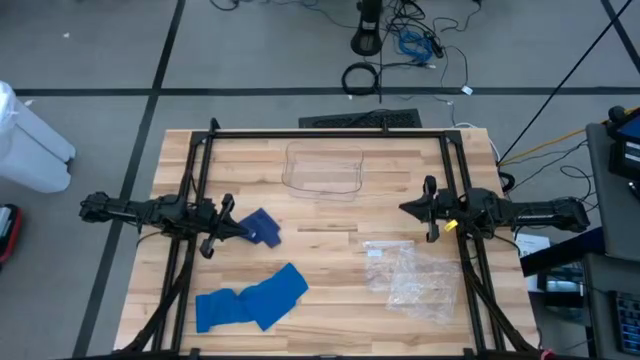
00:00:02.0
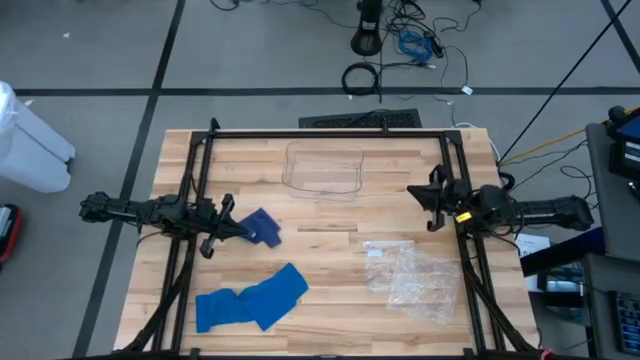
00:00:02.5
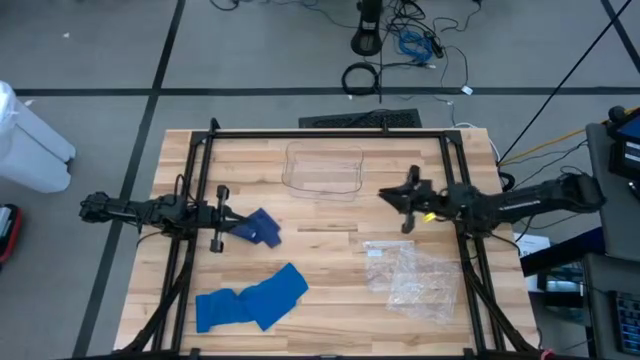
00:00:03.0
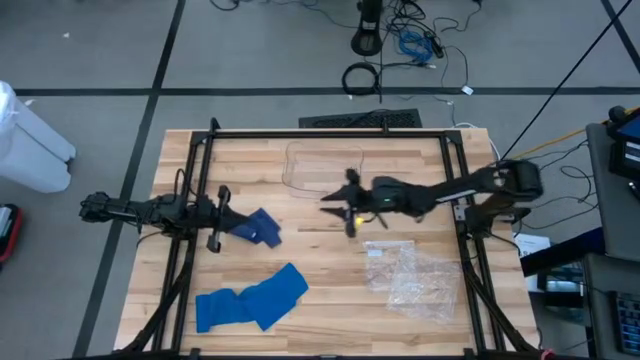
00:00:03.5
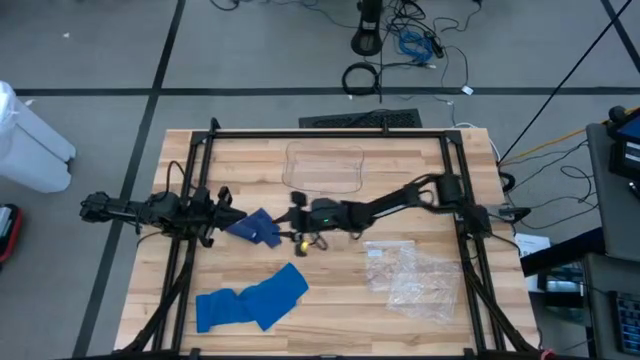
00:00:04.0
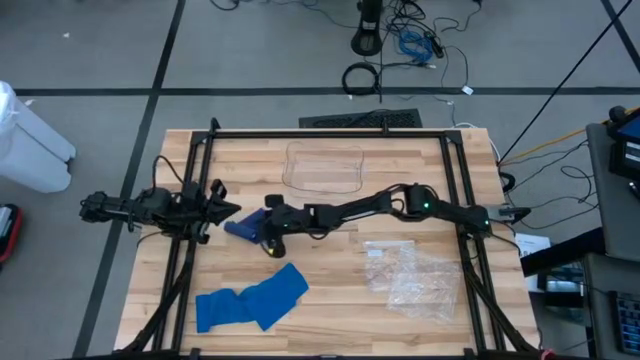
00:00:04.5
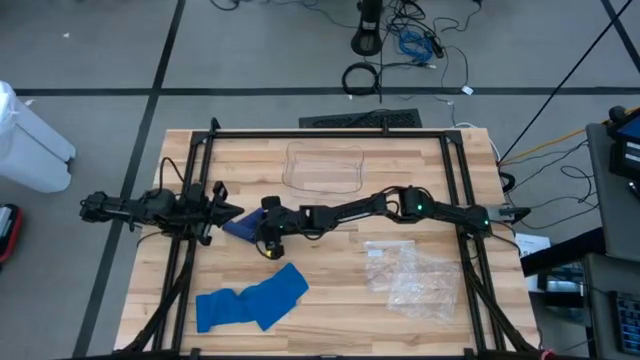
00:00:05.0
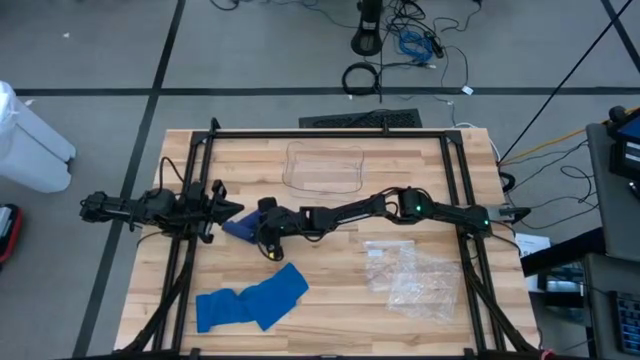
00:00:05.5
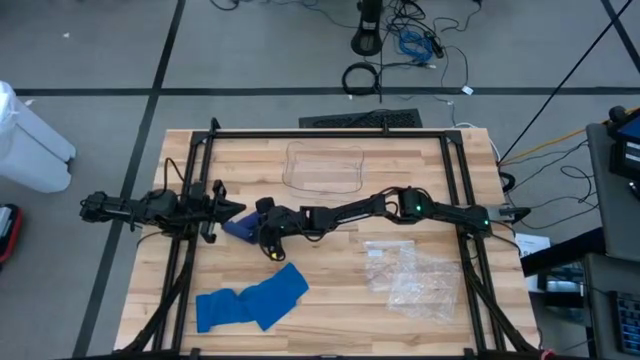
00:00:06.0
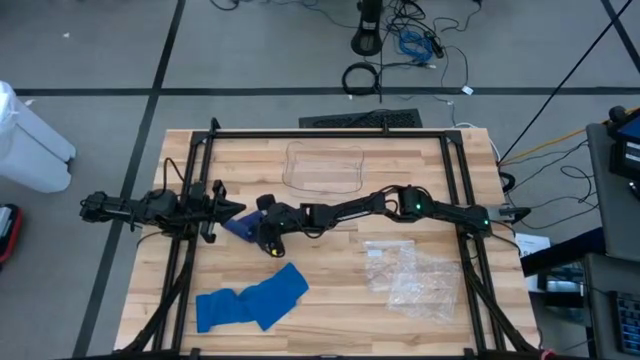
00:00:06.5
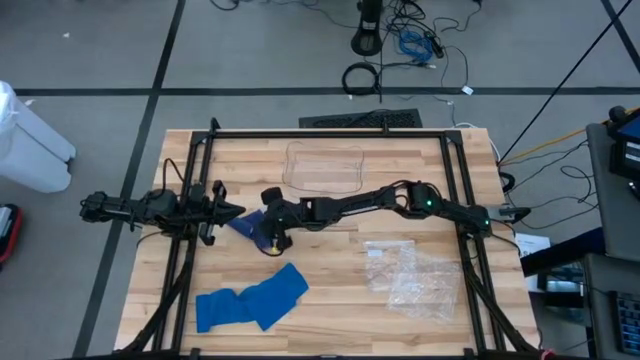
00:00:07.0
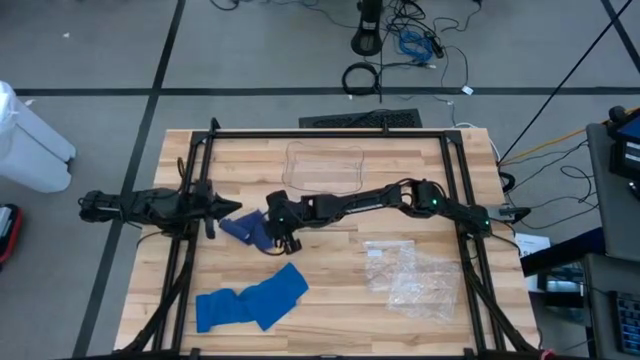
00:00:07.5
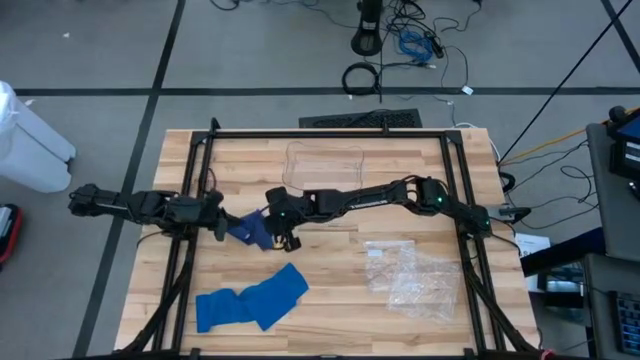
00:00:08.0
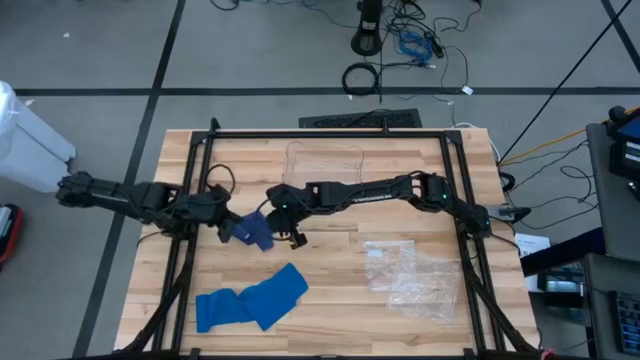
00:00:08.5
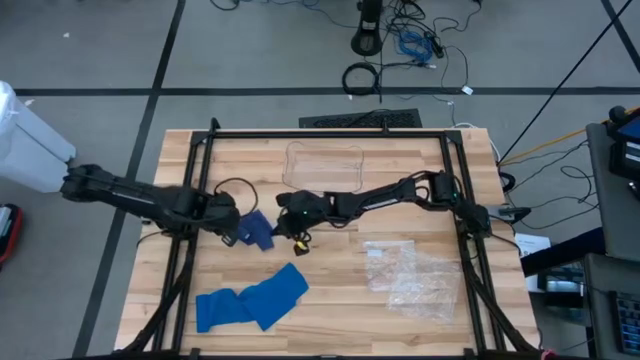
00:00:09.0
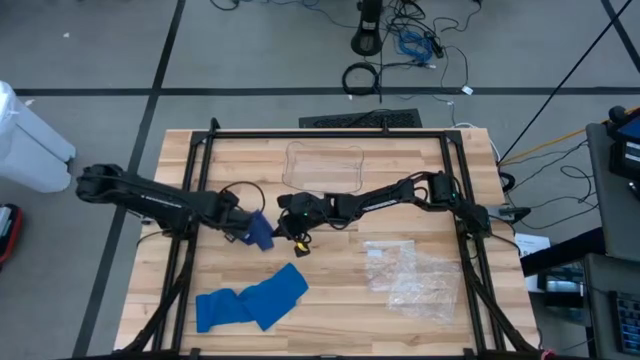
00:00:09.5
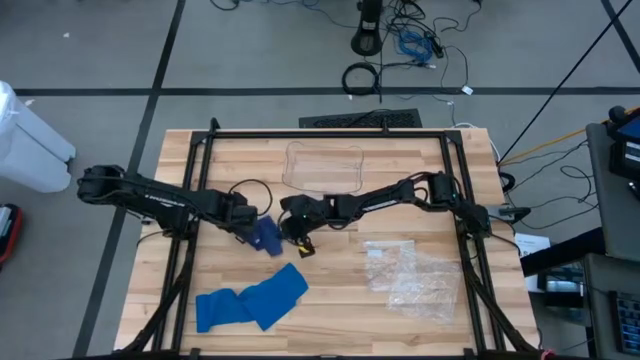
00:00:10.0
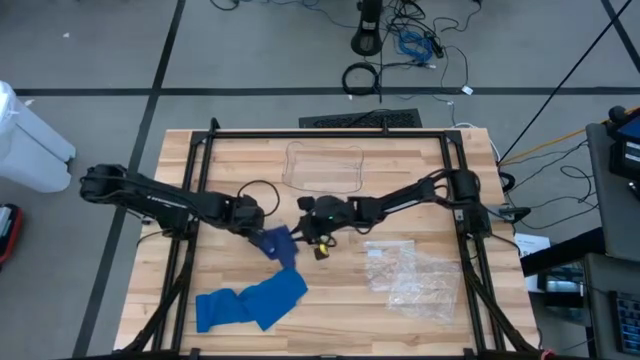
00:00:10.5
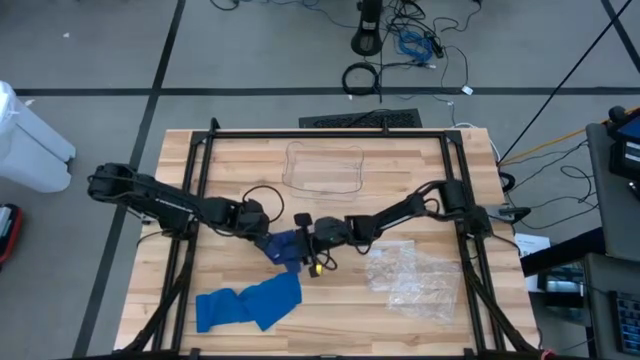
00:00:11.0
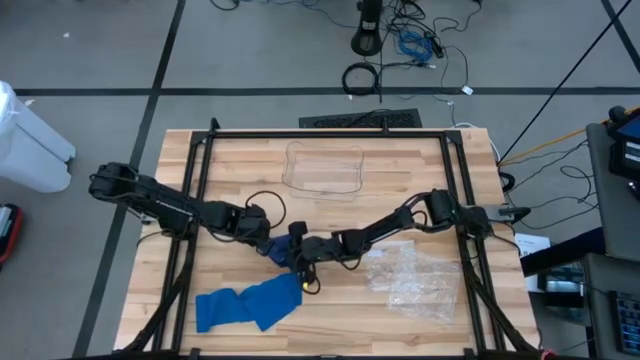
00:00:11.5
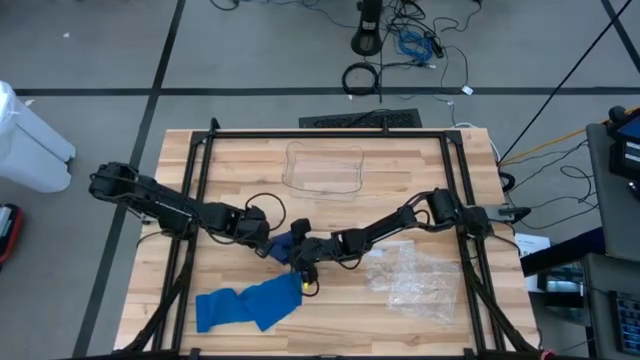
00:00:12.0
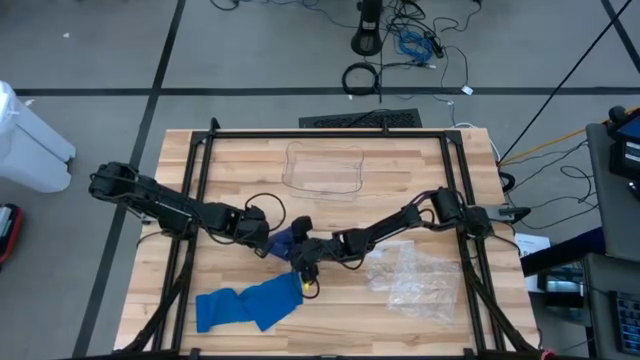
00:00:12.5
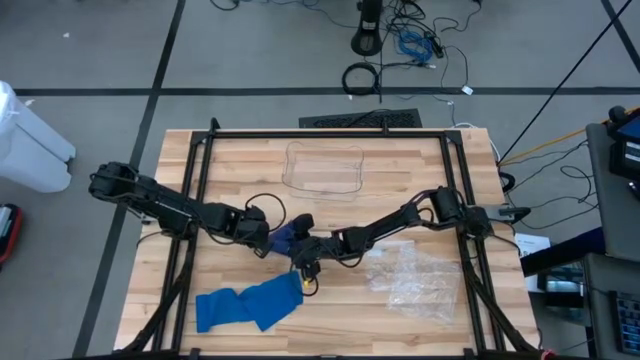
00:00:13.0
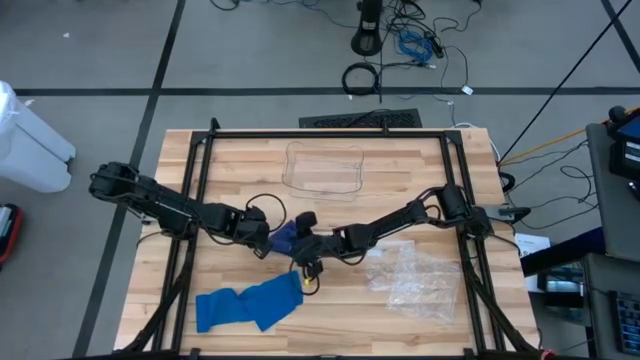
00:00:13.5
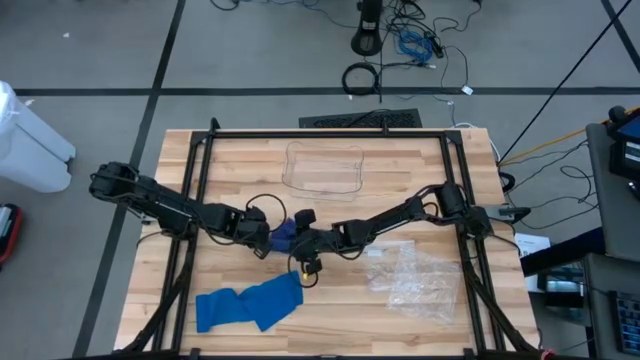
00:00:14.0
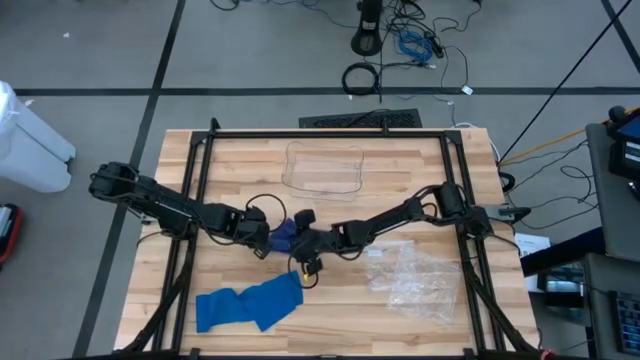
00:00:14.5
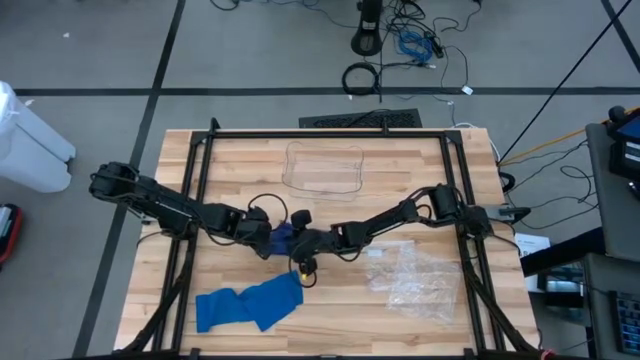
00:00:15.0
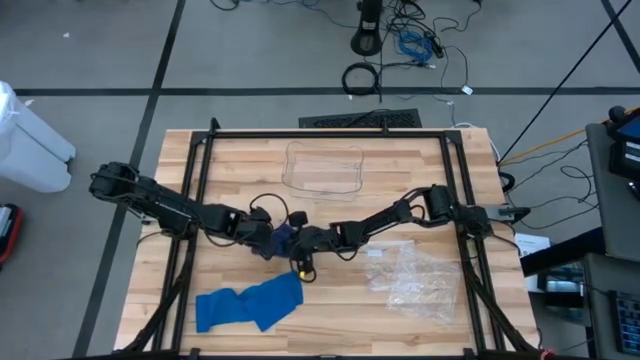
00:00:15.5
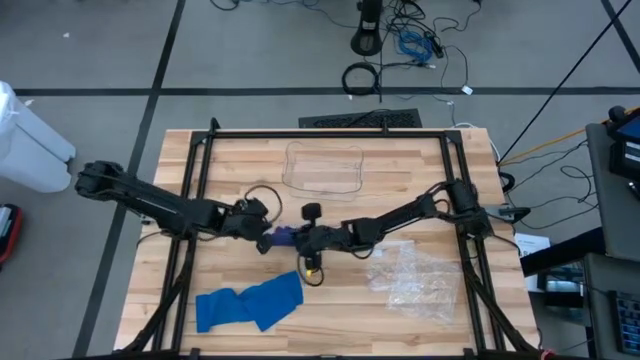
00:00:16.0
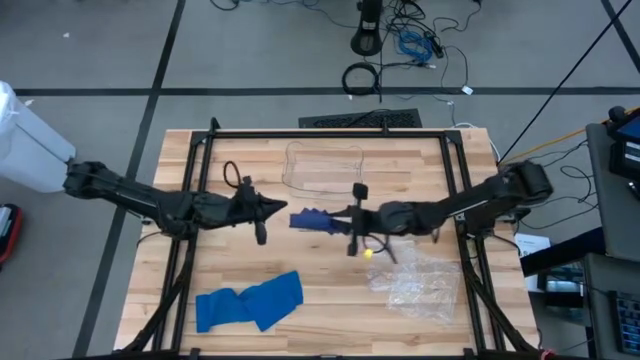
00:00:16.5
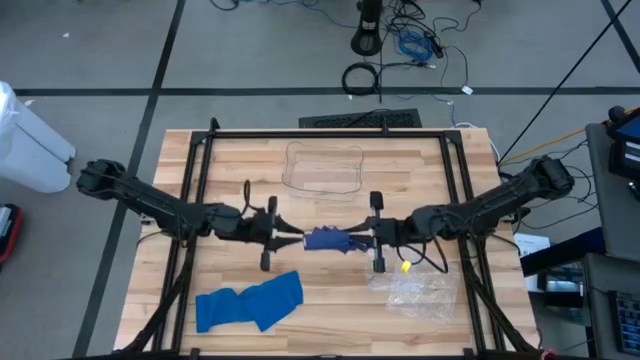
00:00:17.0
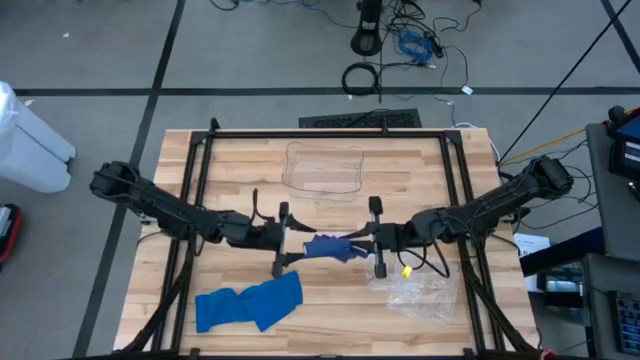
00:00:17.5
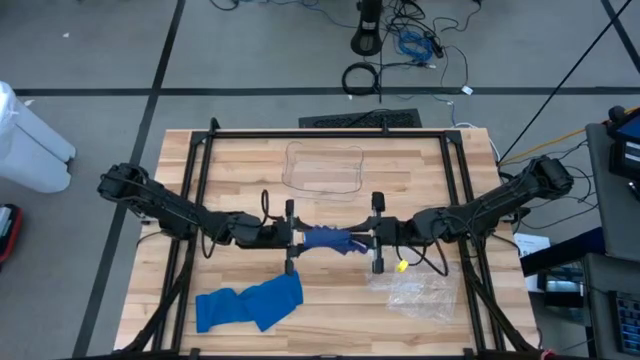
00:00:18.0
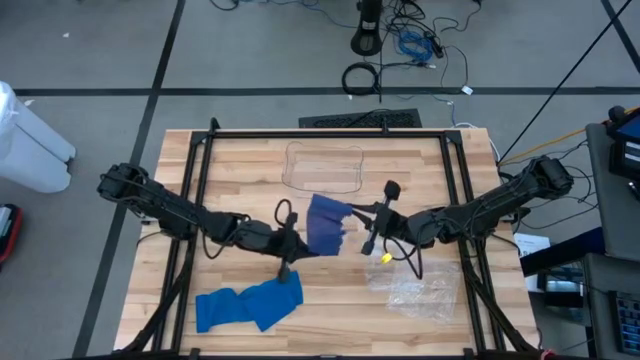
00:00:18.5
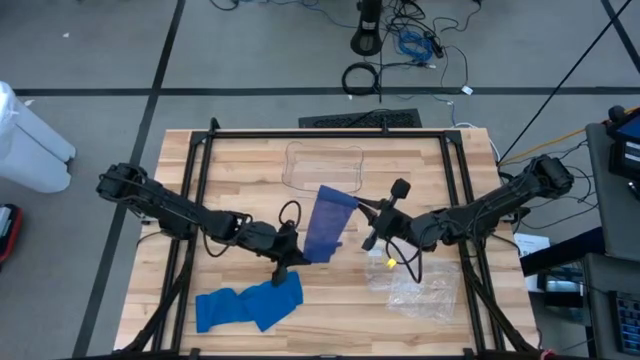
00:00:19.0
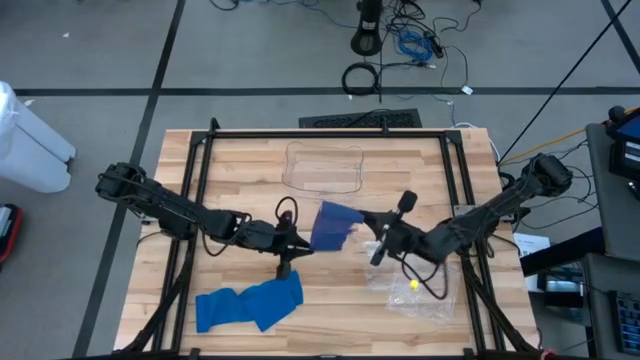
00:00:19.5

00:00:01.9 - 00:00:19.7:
Task: Roll bandage
Roll the purple bandage
